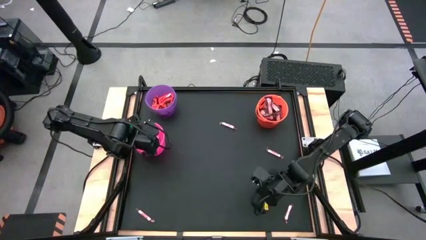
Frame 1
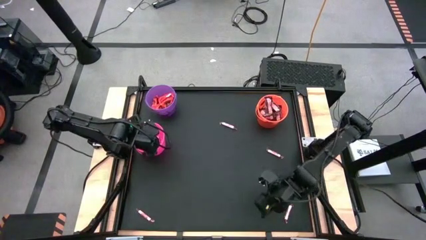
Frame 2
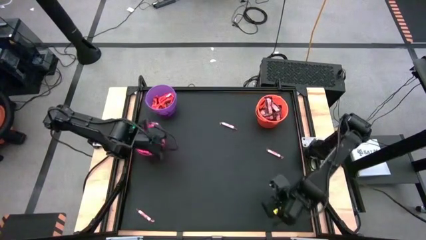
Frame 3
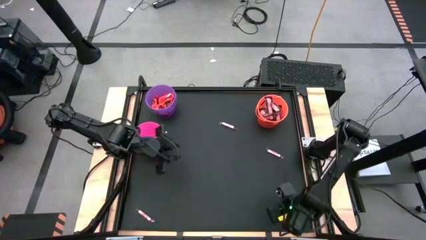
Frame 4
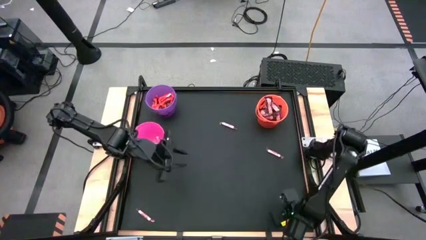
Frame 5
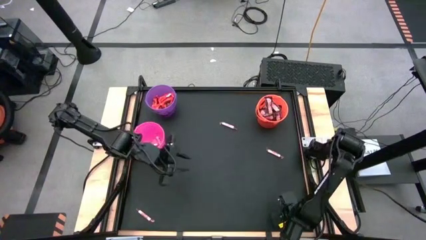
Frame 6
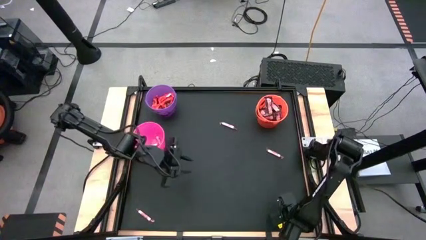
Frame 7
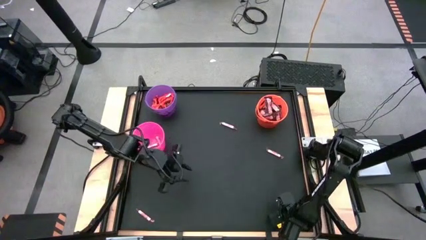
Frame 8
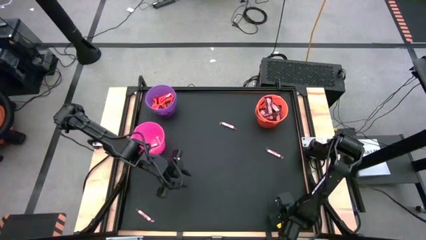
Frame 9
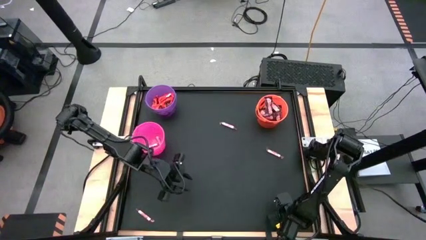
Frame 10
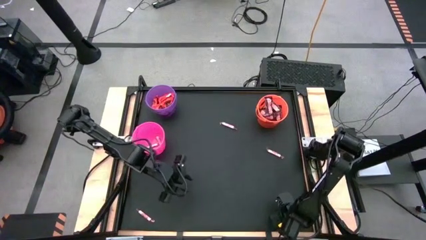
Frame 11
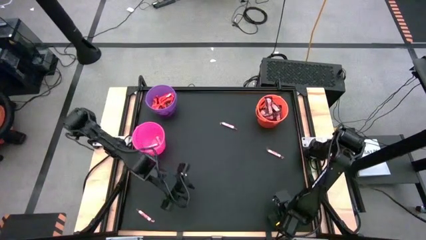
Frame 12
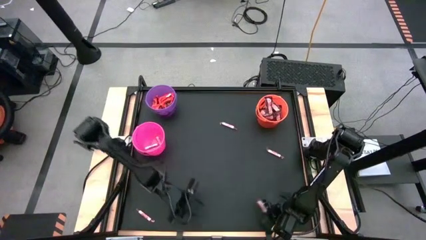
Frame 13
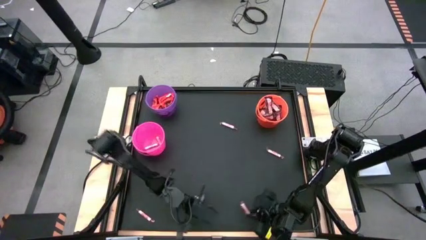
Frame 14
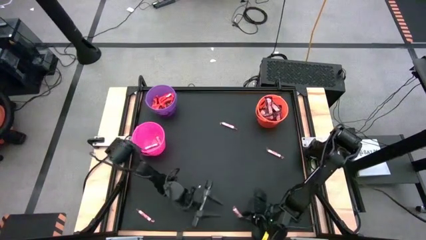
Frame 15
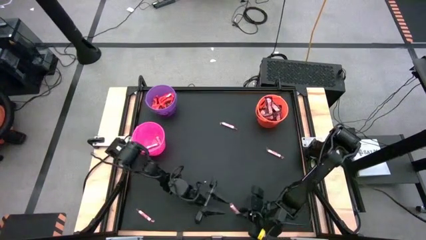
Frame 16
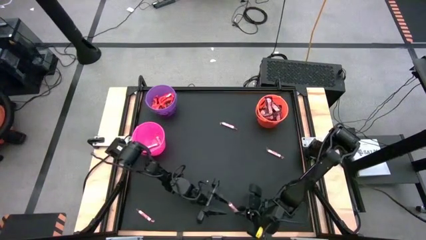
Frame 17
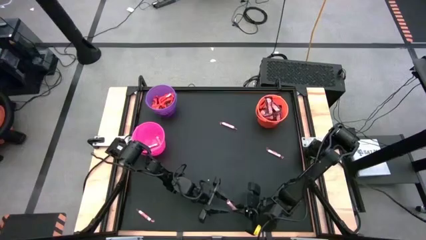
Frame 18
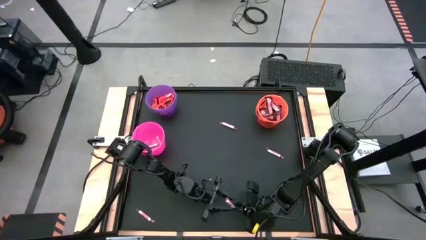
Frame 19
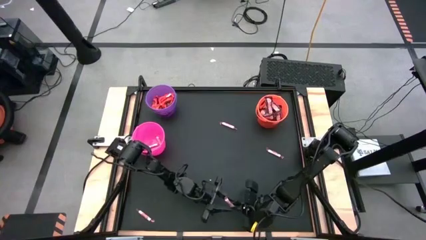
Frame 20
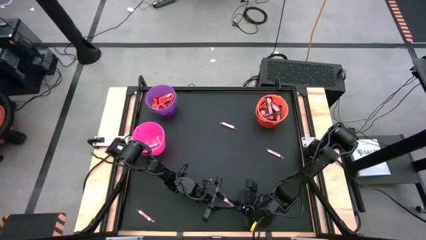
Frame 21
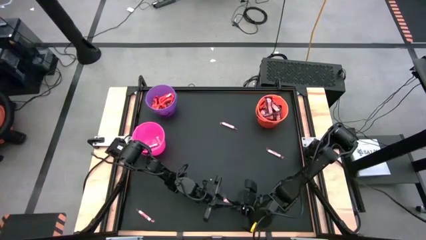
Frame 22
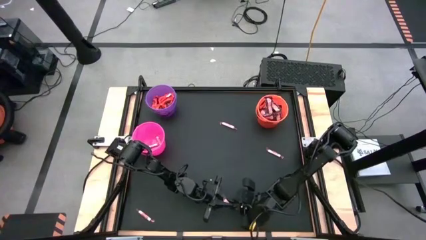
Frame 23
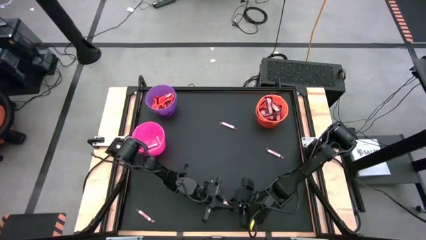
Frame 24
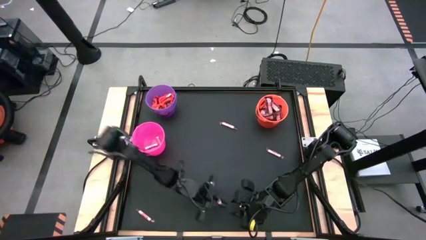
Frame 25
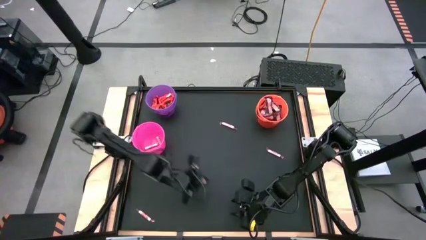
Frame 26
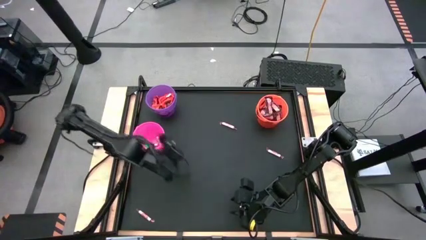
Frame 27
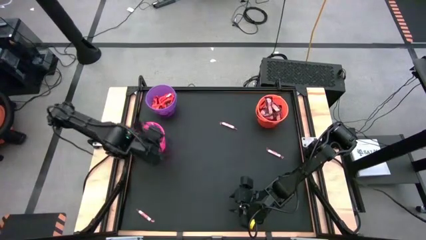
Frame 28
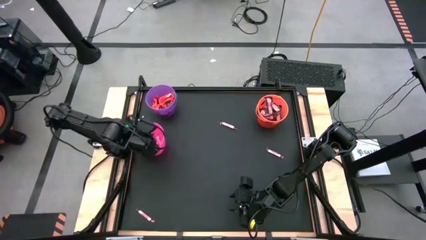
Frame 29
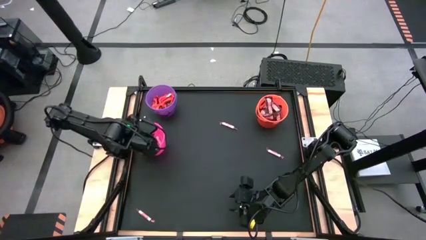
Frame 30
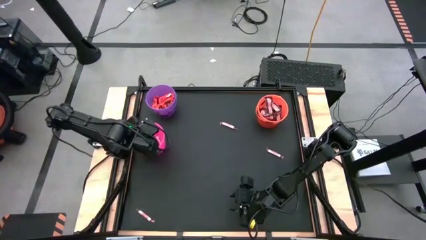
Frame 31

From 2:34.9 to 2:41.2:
Task: Sort candy by brand, put in halloween buckets
Put the red candy into the pink bucket

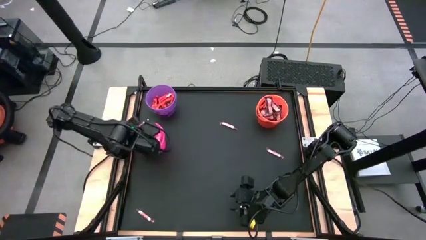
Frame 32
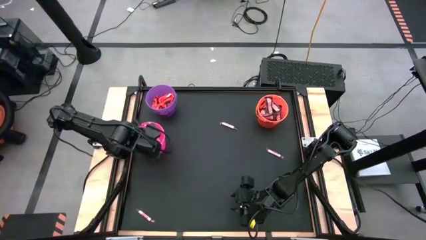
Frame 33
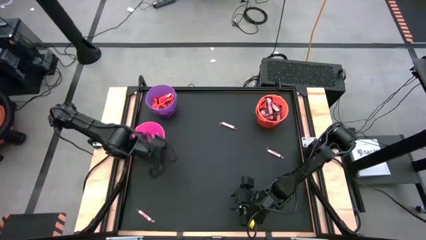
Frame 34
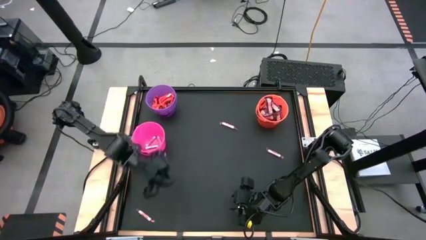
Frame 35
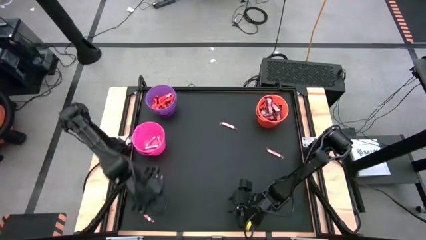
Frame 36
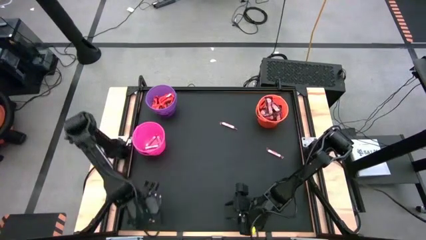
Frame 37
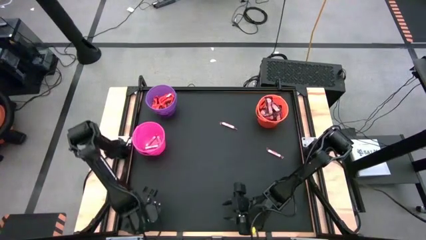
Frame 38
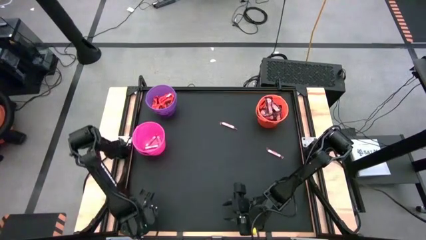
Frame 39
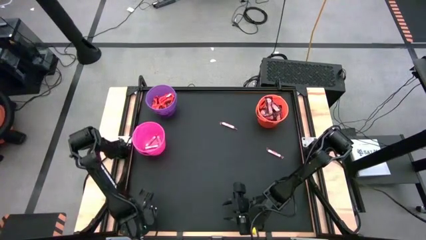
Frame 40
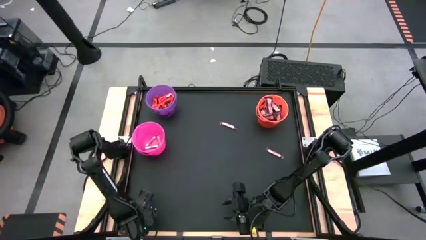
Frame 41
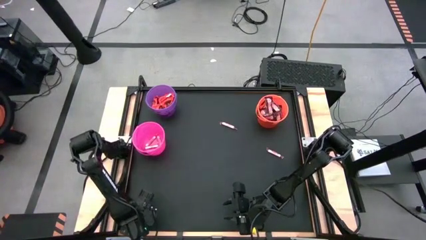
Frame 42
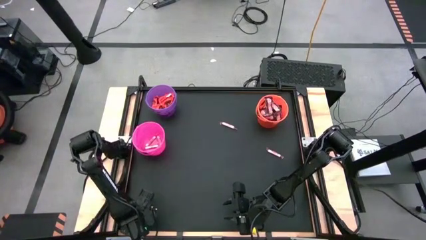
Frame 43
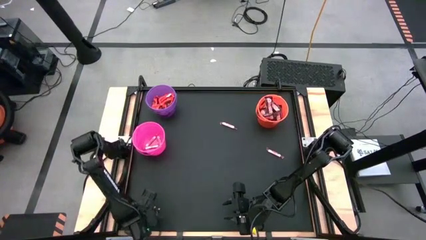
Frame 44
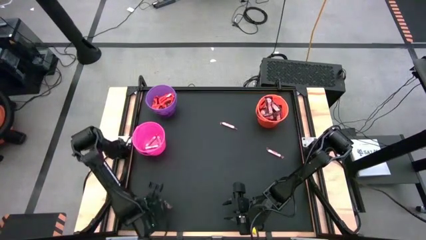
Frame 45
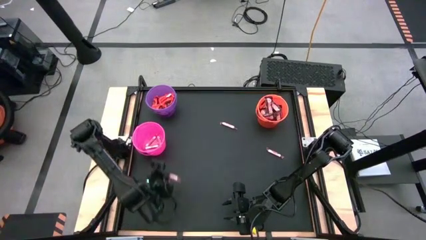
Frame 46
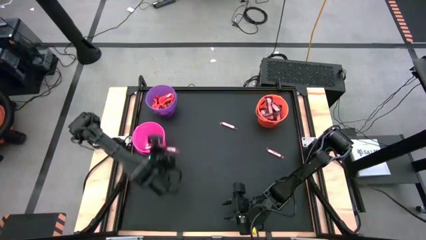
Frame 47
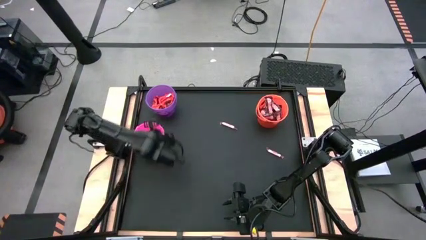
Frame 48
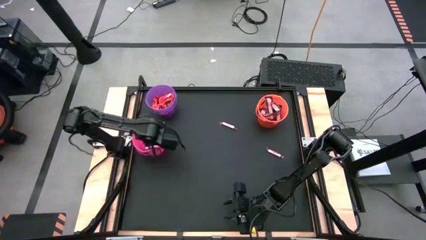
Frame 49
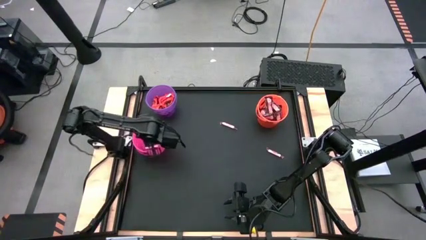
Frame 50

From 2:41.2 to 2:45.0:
Put the red candy into the pink bucket

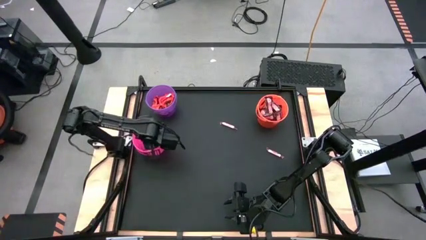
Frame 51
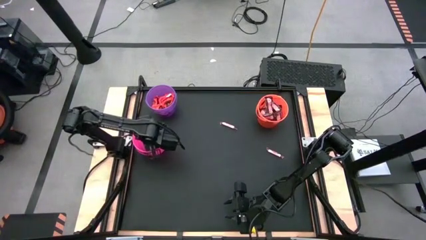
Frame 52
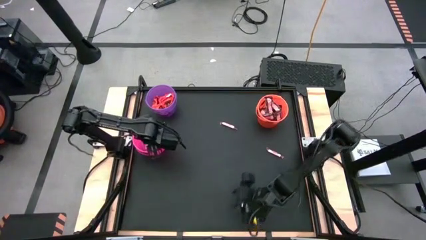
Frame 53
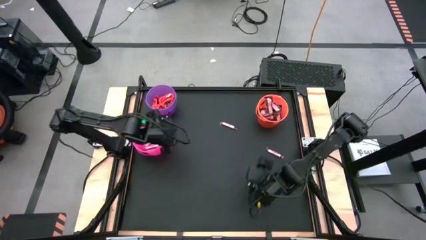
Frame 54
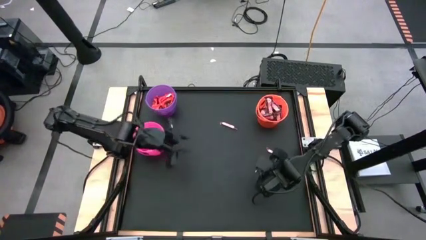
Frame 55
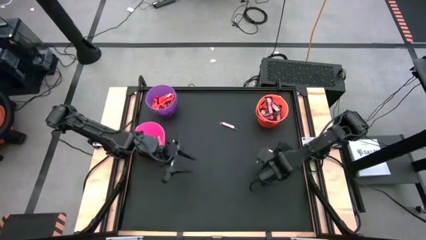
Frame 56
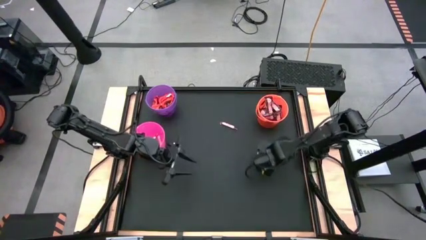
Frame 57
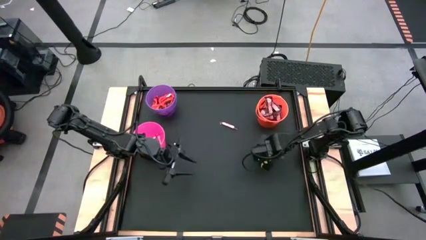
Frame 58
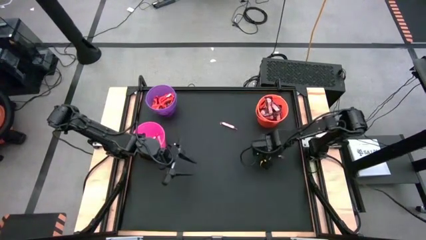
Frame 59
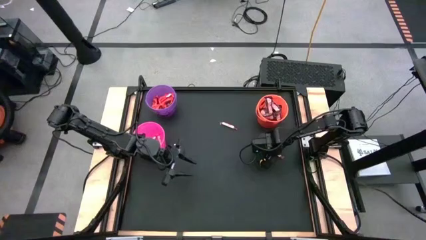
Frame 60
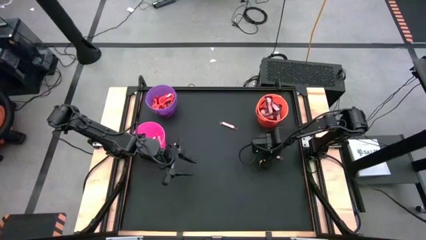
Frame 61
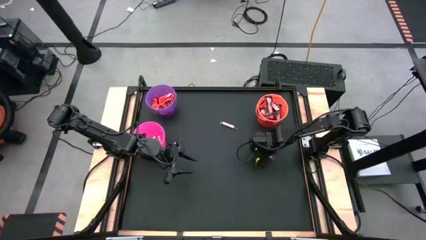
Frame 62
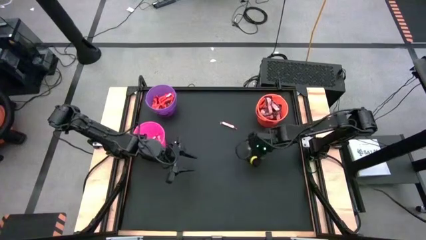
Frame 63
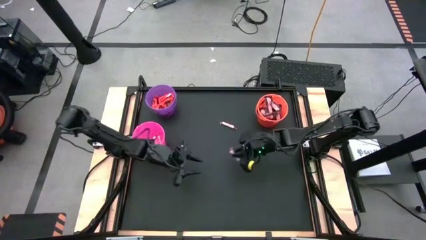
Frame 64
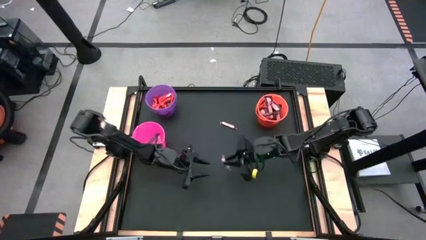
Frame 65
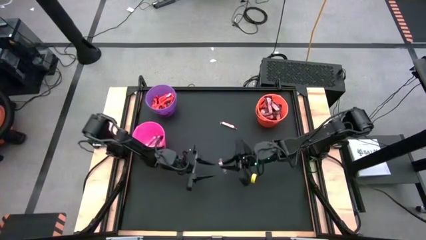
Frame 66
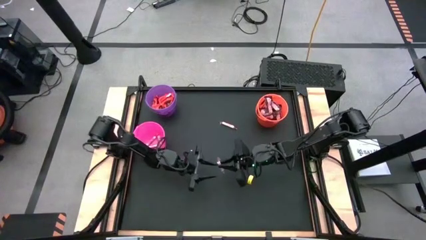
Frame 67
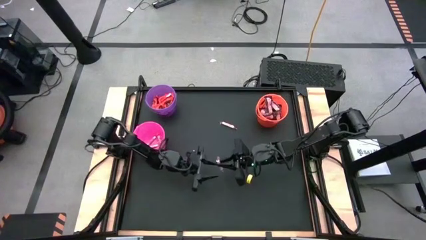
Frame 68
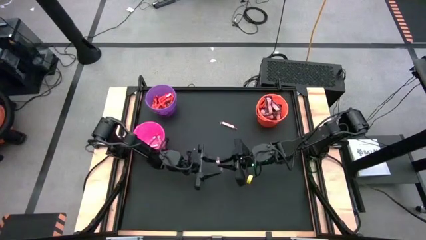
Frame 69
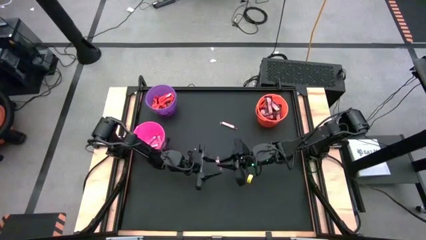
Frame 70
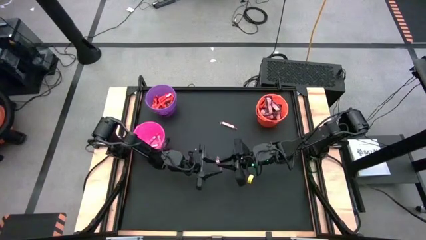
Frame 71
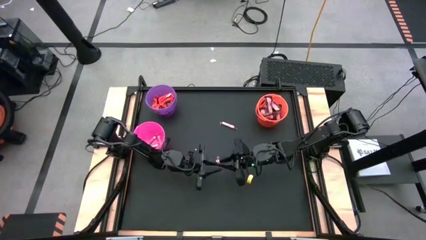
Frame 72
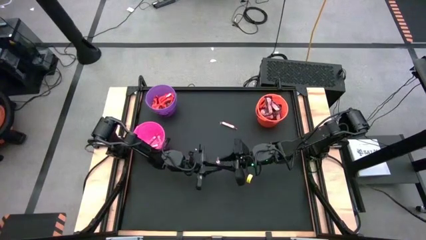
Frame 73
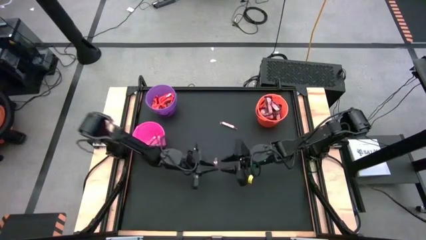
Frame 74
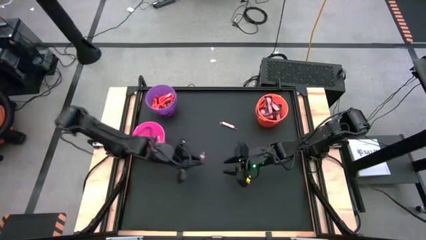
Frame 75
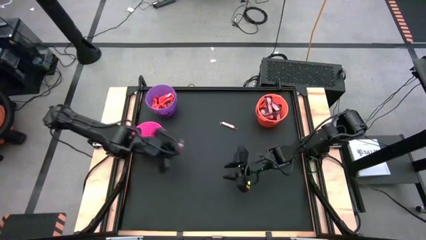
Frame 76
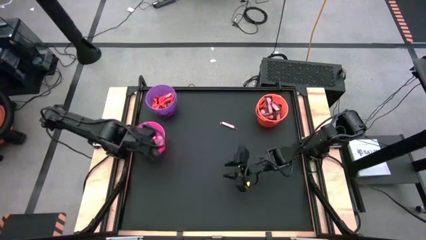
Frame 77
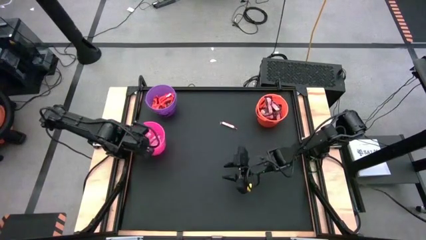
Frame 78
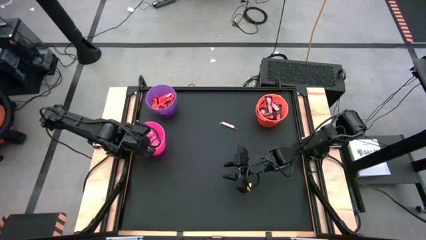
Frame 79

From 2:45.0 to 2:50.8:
Put the red candy into the pink bucket

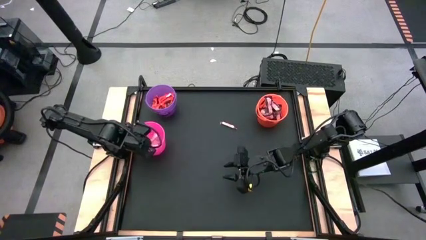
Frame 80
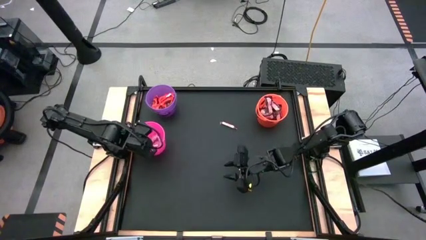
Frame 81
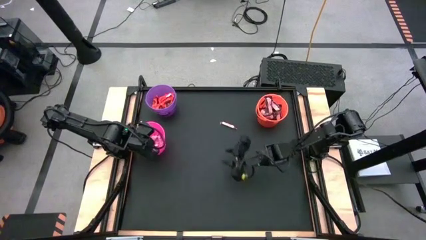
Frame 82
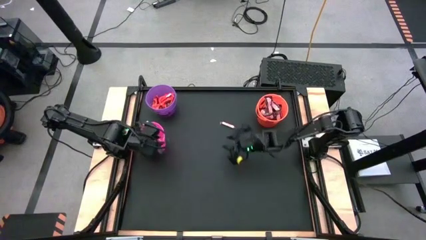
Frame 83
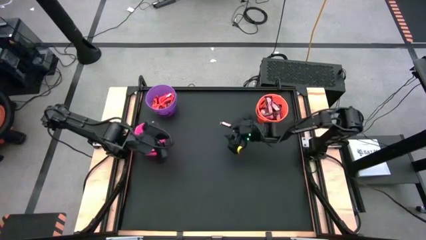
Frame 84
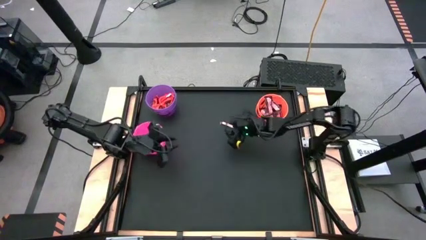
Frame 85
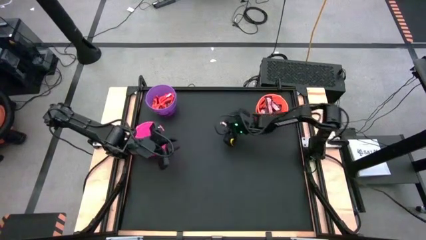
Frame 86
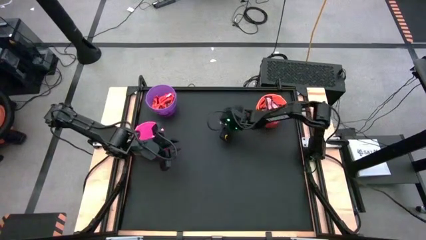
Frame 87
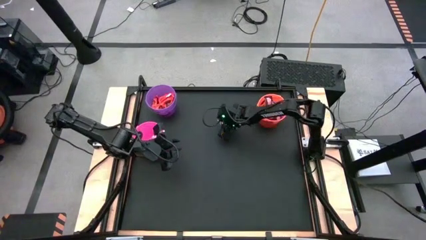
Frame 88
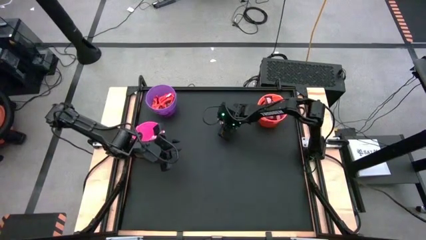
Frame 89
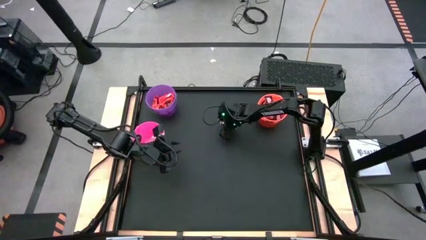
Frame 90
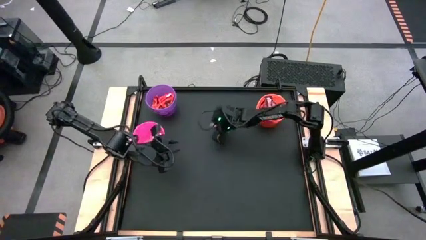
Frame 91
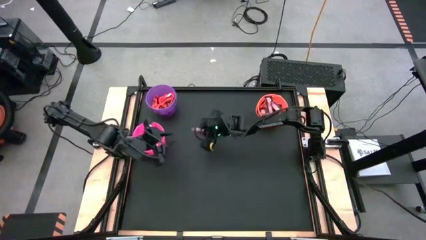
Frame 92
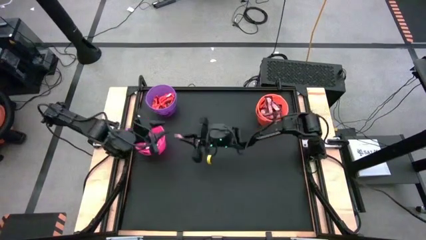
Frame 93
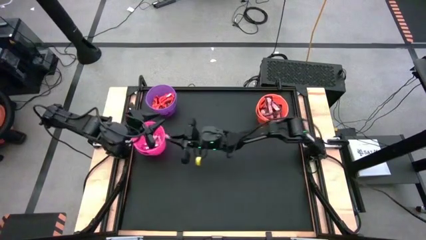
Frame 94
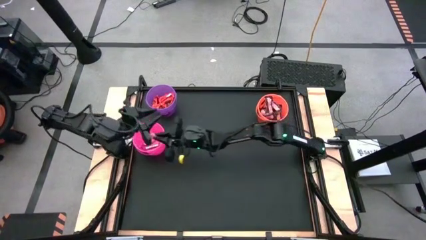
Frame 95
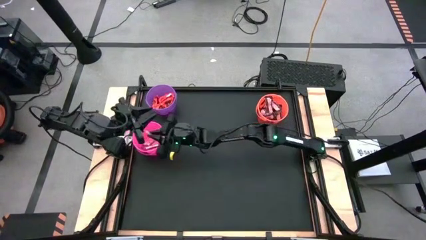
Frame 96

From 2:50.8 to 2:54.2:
Put the red candy into the pink bucket
